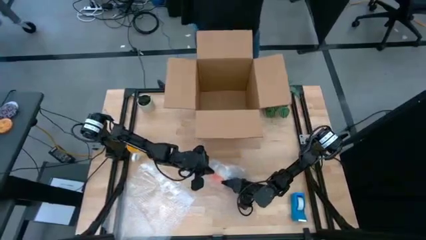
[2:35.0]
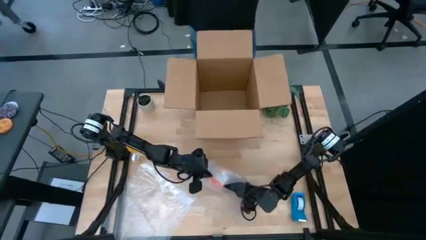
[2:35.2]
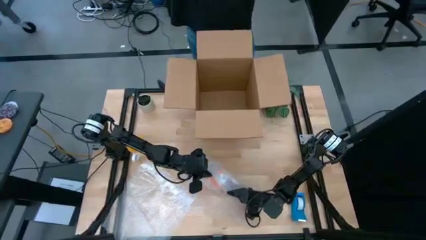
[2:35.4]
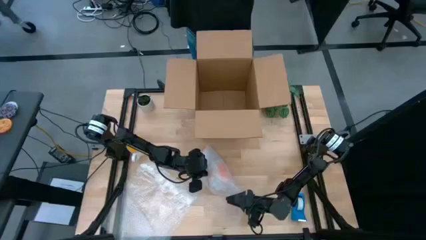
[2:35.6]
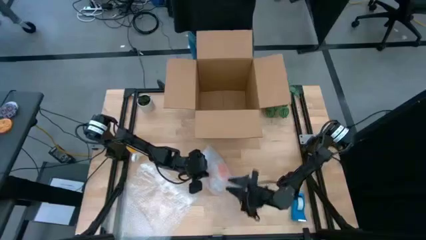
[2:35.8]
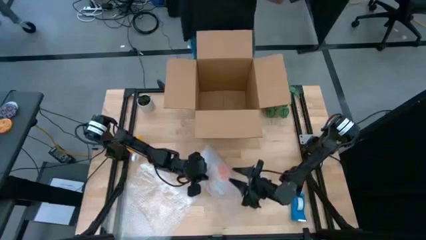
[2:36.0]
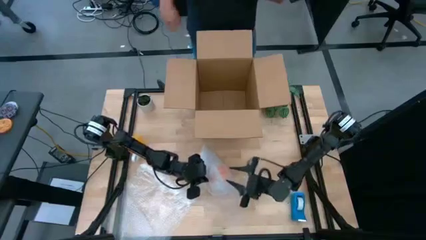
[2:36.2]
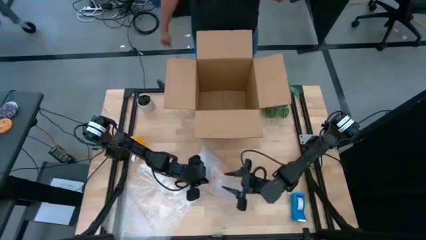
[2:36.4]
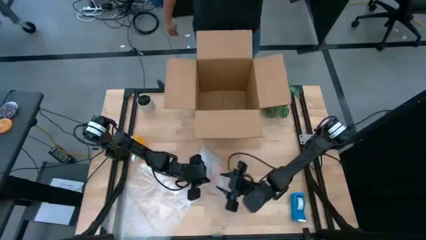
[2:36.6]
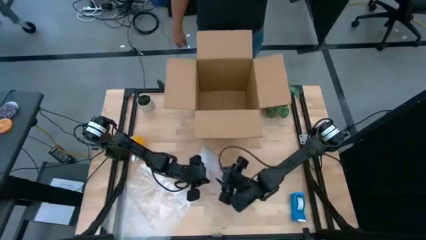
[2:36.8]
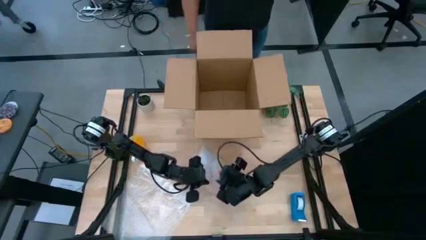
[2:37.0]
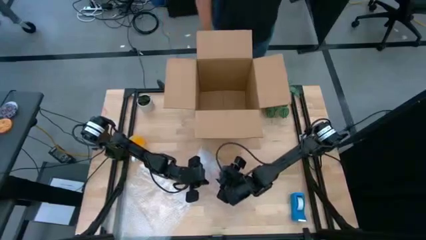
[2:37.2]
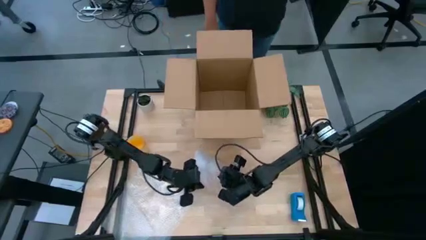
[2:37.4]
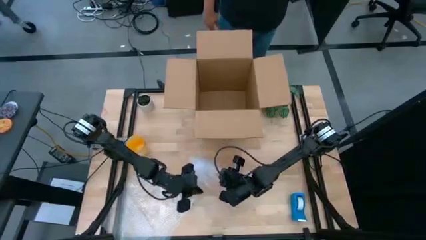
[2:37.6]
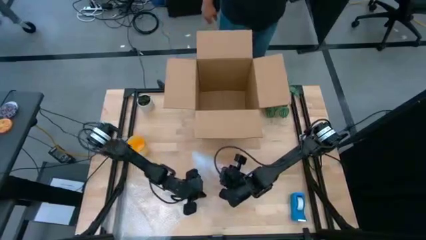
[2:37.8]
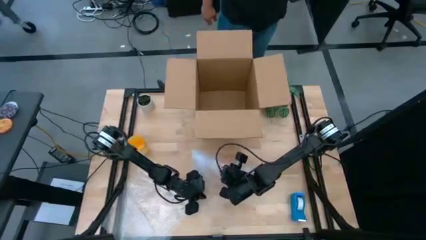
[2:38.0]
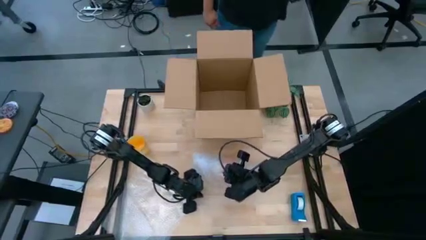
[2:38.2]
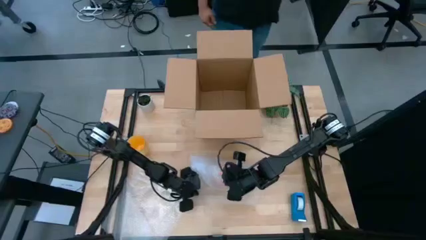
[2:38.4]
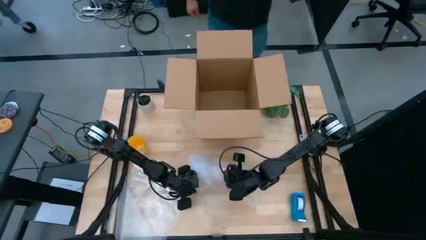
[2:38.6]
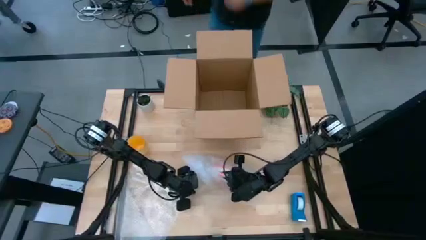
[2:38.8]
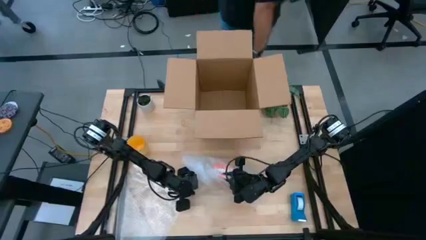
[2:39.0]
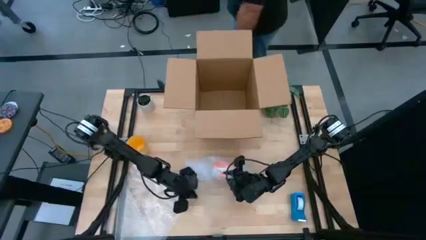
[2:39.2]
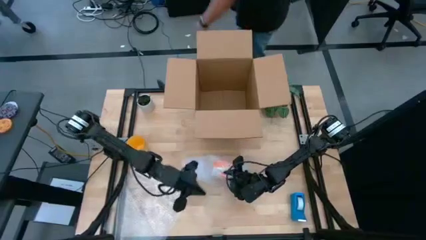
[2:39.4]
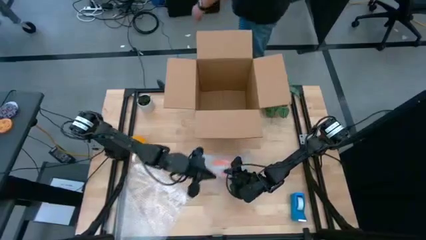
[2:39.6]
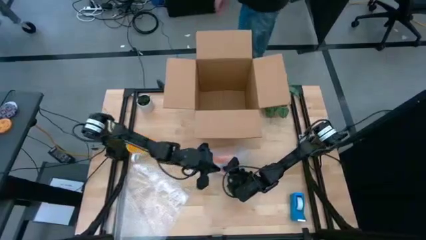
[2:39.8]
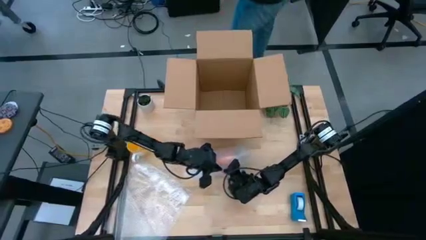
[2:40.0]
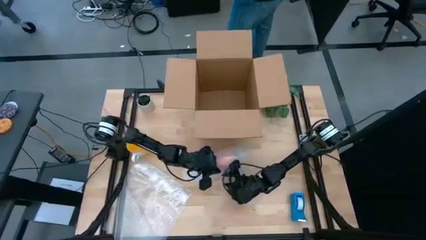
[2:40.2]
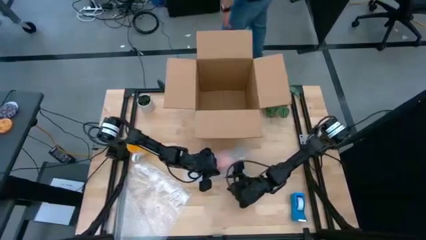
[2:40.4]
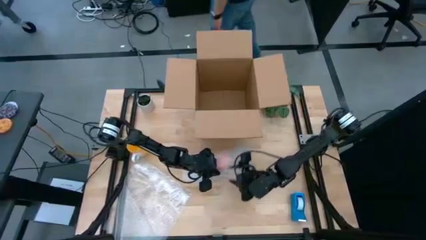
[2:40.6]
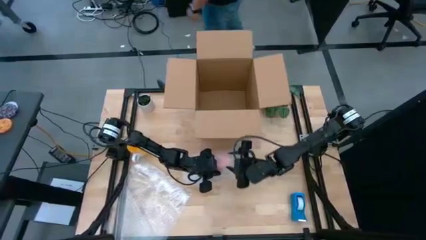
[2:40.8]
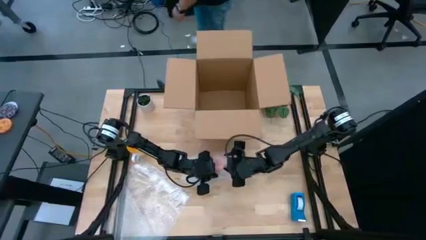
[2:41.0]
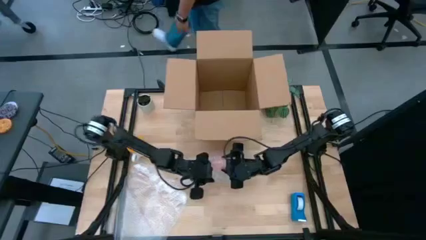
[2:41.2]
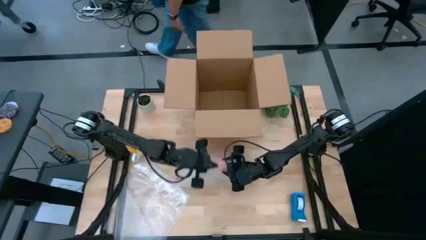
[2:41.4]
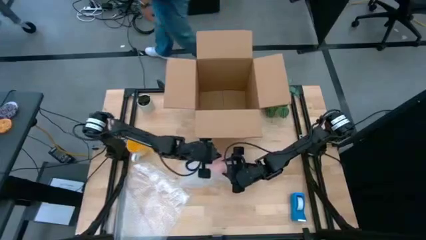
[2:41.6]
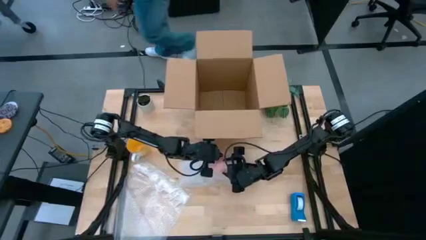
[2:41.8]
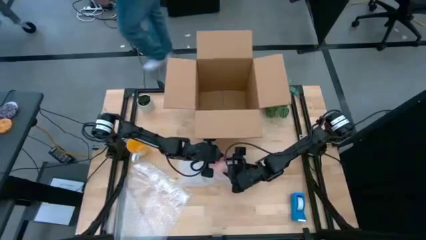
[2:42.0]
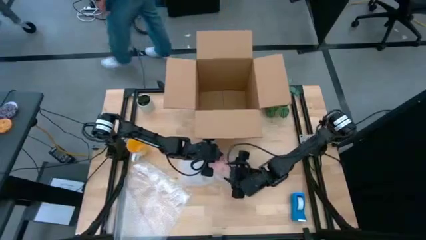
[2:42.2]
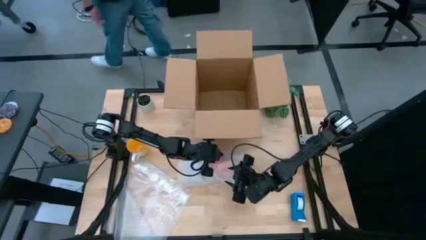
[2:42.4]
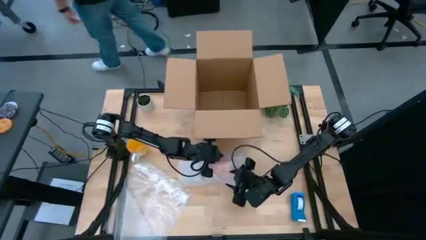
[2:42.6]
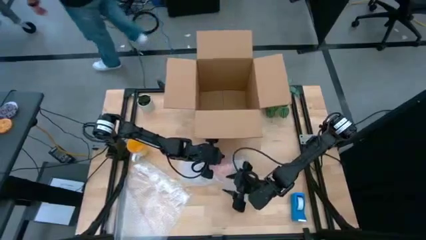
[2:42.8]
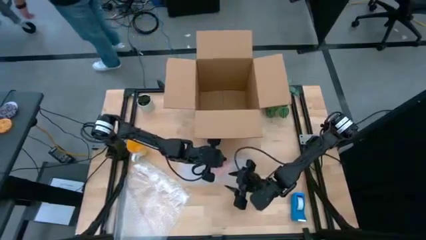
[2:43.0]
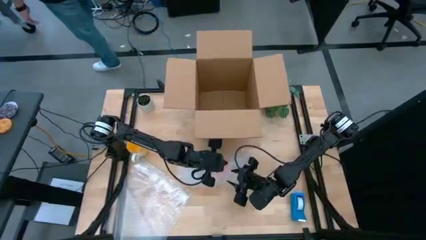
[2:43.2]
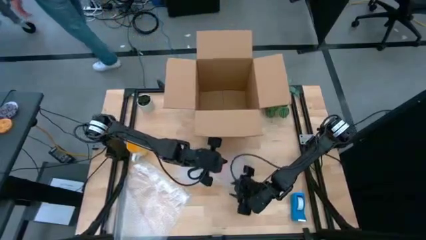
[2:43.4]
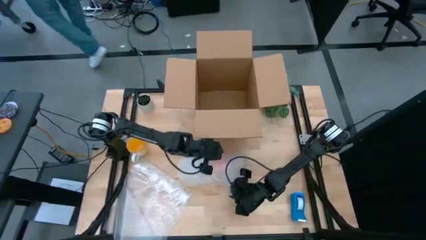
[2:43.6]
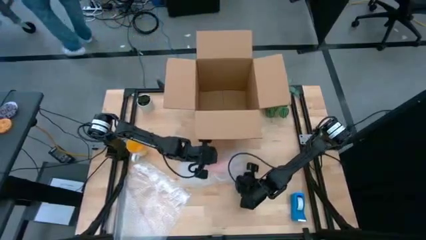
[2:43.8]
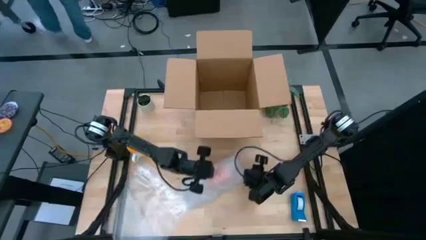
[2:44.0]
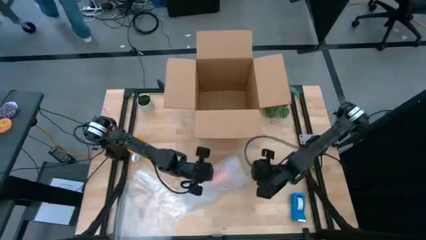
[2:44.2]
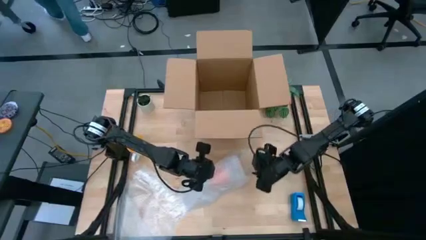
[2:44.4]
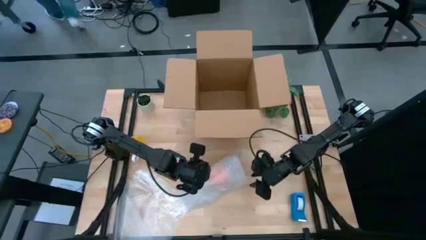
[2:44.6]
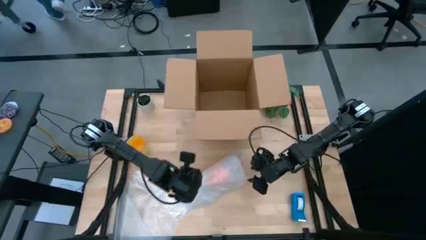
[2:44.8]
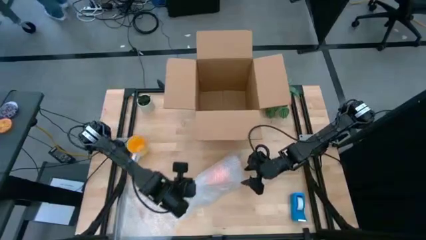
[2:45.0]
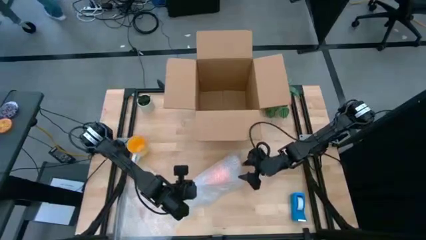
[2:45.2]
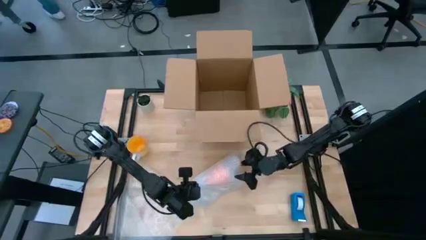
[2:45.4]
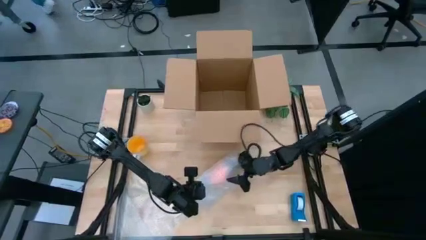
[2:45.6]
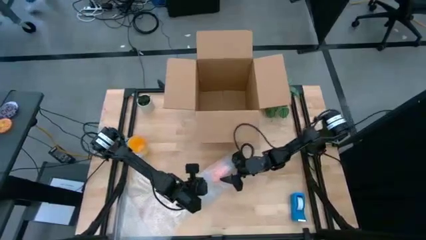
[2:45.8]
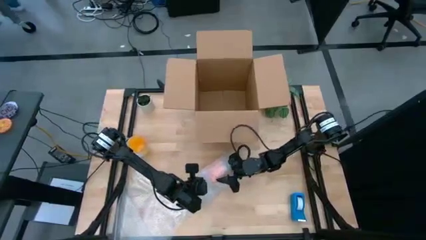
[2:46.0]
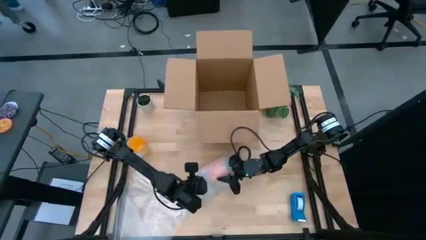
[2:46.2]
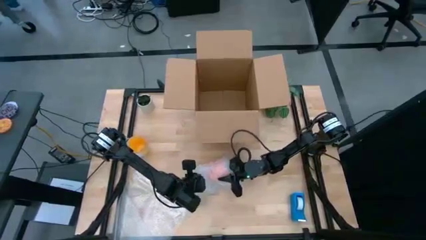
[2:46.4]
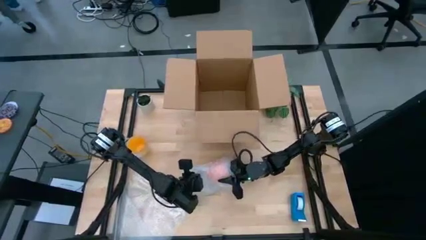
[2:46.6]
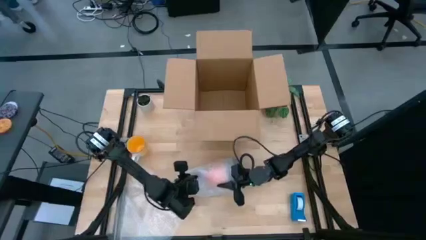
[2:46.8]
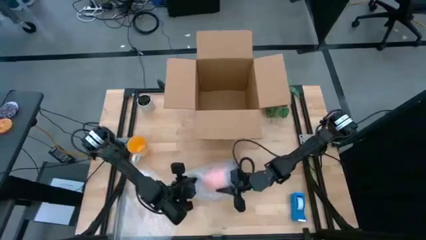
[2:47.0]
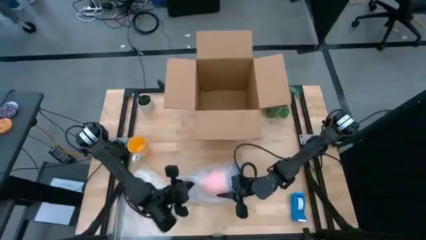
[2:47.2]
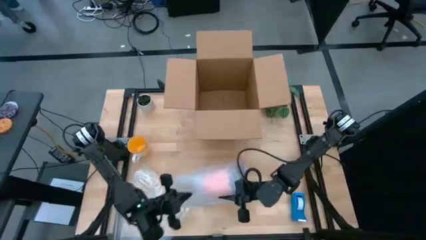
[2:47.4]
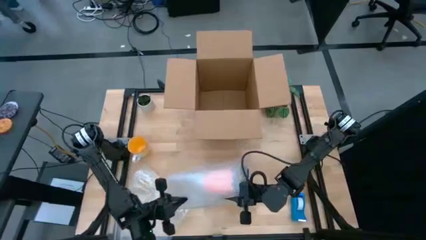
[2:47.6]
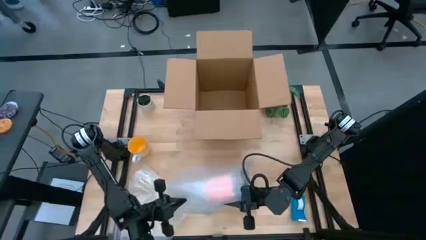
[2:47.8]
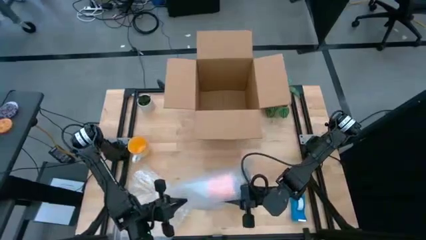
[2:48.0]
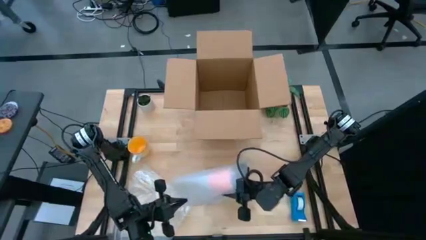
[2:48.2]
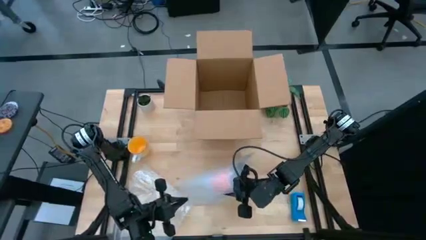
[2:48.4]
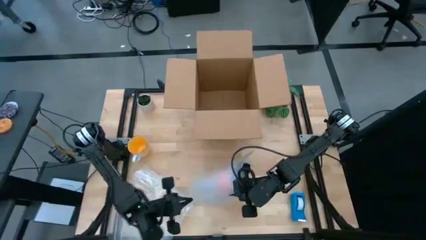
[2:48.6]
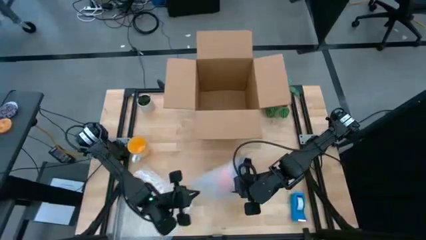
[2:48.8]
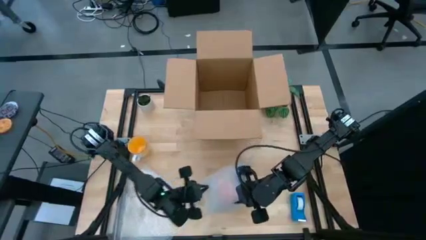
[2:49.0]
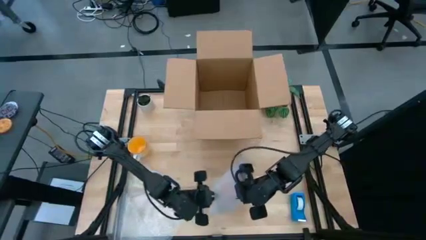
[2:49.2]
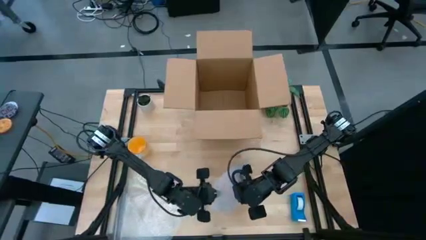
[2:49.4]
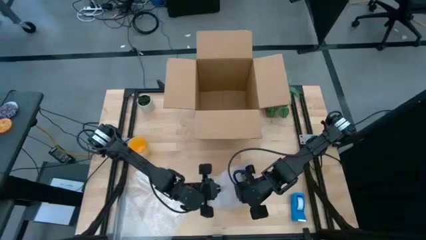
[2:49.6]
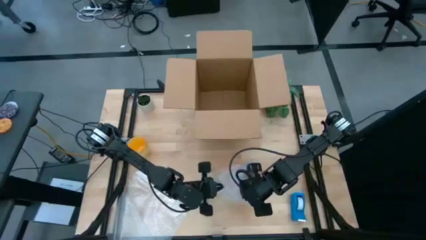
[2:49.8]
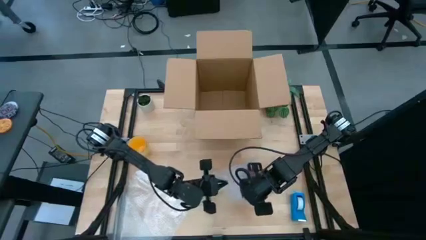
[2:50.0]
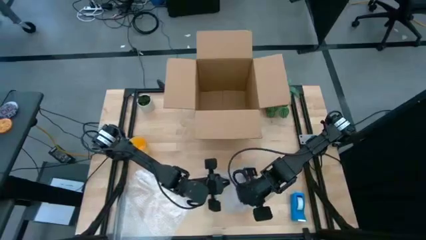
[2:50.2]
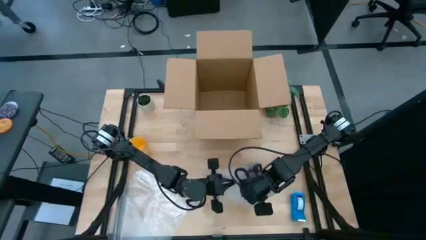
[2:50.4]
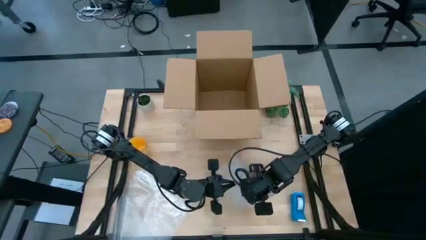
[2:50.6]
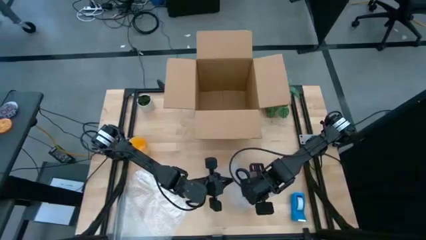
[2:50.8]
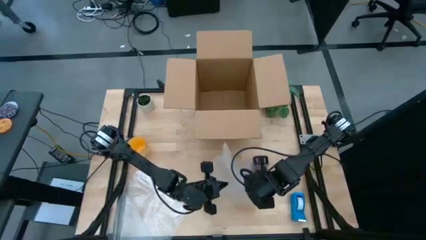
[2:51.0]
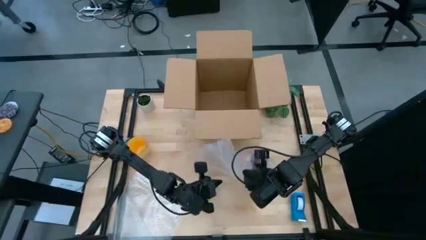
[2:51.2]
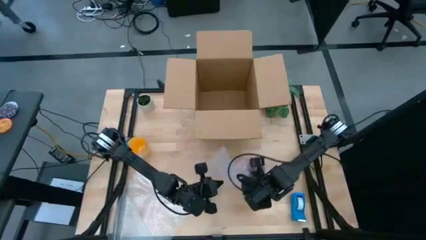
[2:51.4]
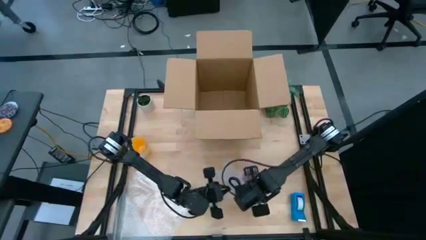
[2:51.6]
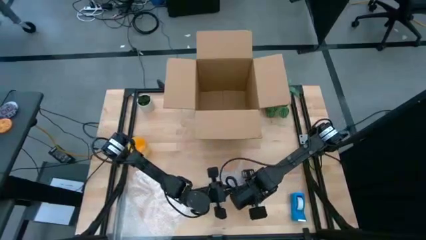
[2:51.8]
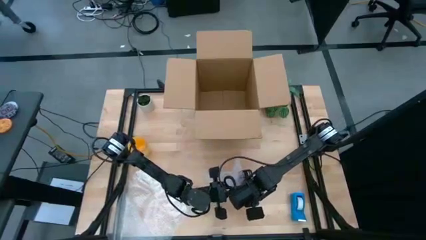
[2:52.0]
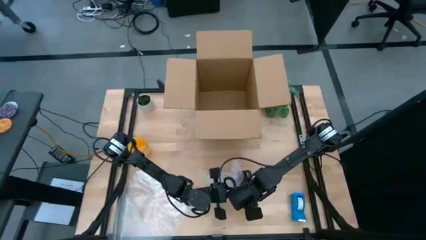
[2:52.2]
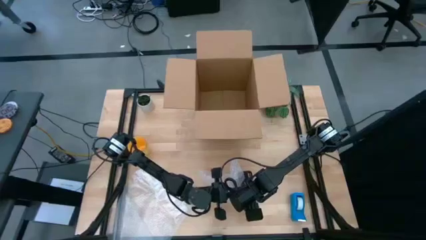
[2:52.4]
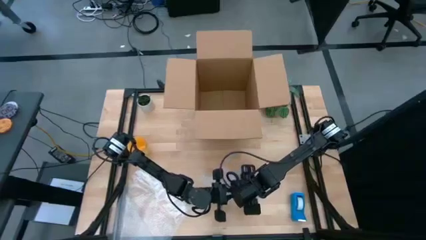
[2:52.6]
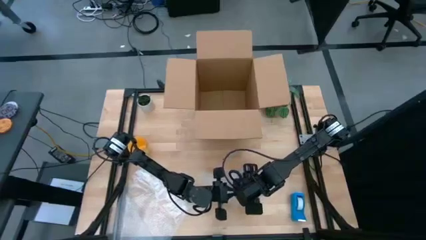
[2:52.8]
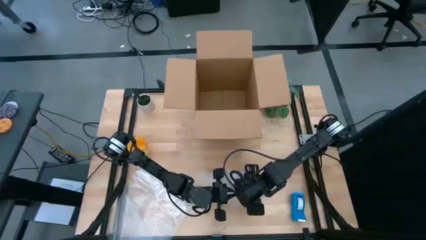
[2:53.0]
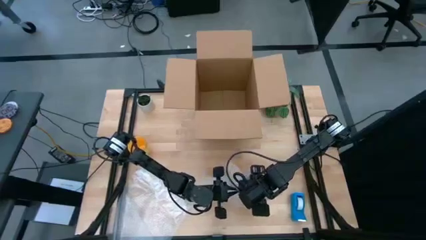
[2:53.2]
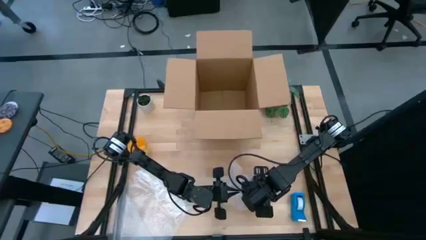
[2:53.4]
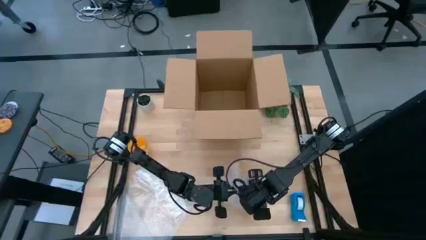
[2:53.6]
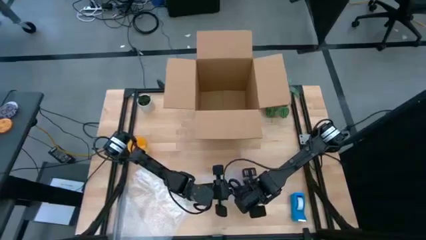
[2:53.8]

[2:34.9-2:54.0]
Task: wrap mug
Wrap the orange mug with the bubble wrap
